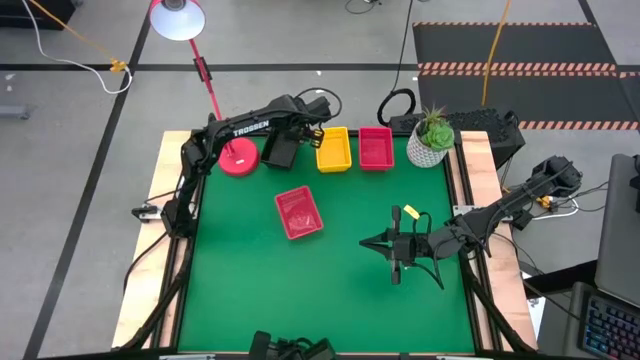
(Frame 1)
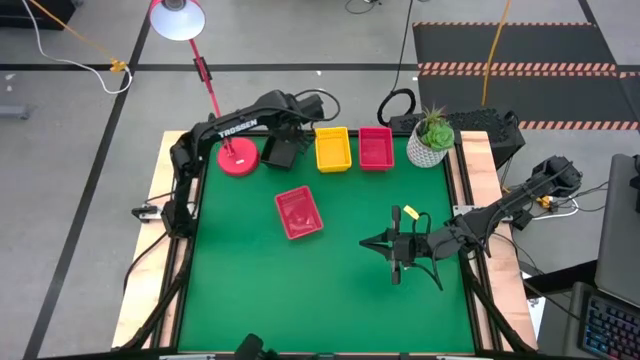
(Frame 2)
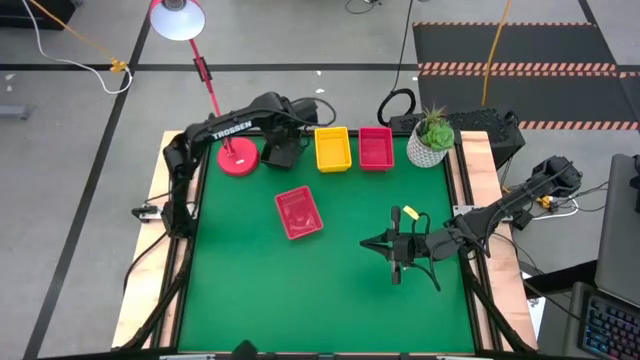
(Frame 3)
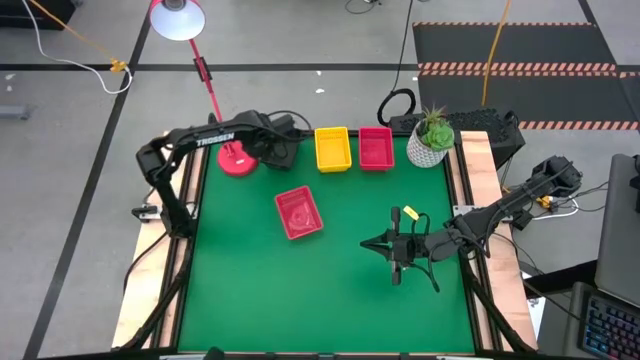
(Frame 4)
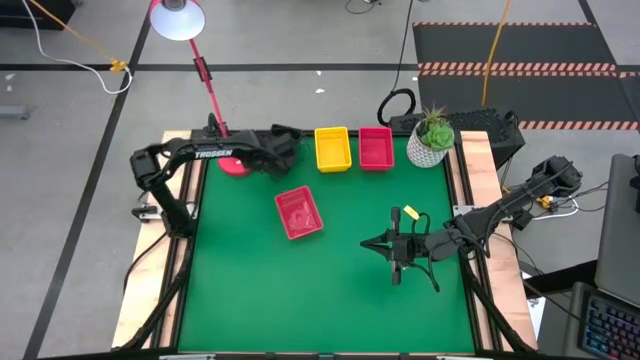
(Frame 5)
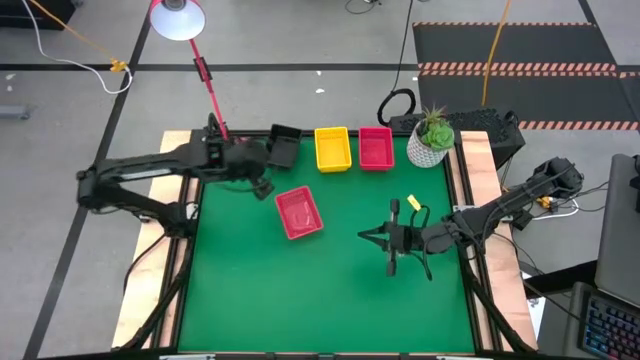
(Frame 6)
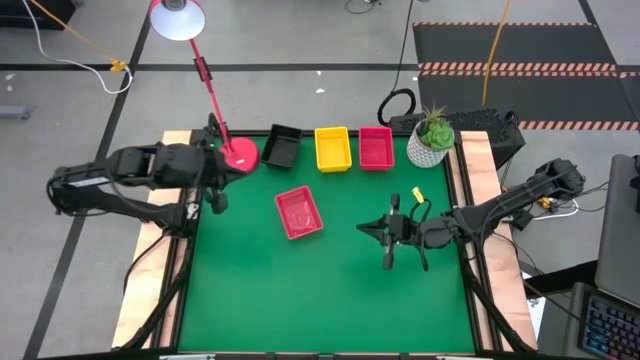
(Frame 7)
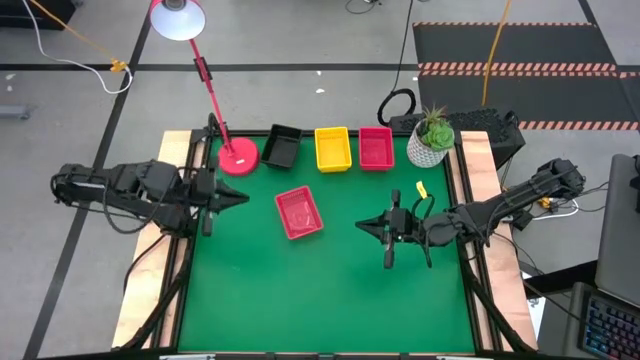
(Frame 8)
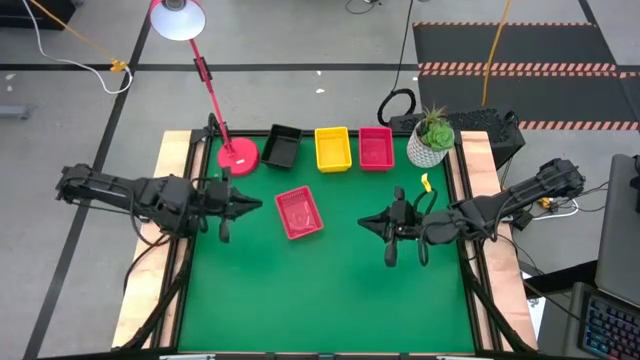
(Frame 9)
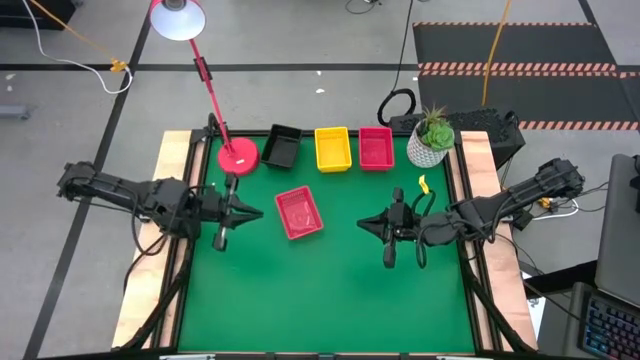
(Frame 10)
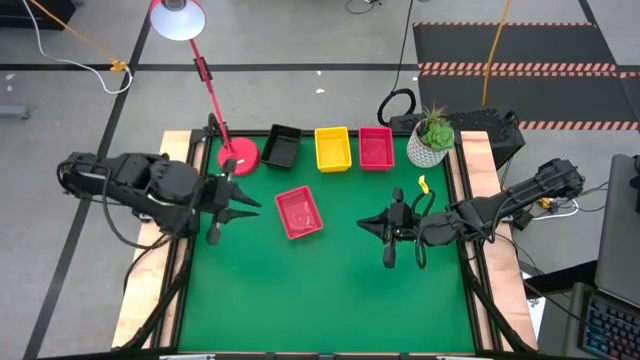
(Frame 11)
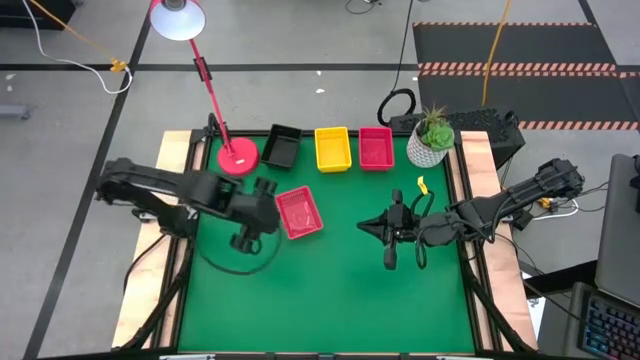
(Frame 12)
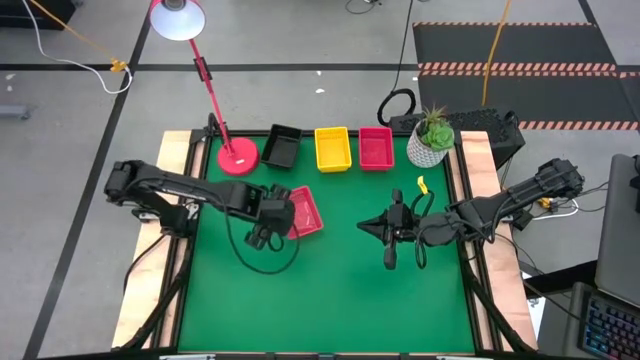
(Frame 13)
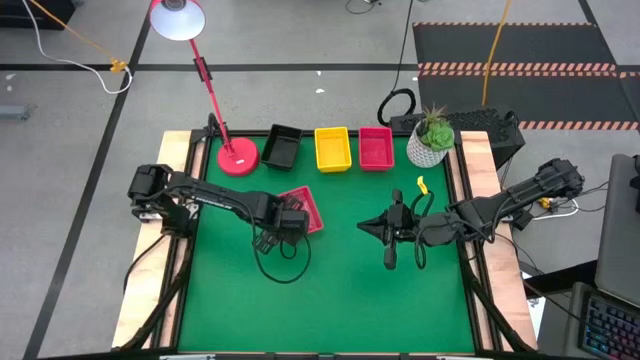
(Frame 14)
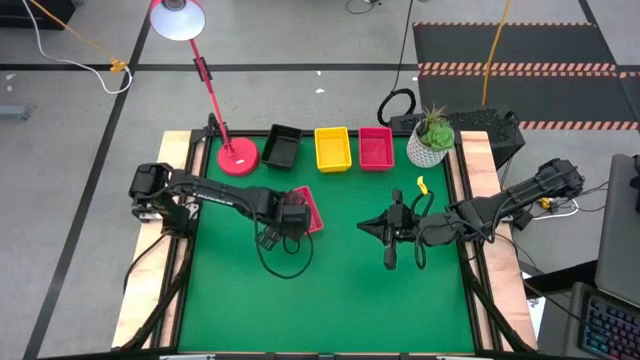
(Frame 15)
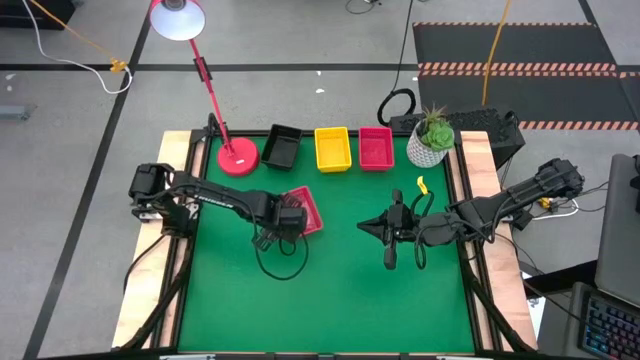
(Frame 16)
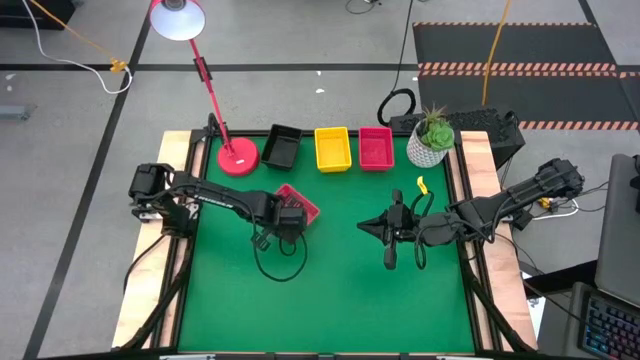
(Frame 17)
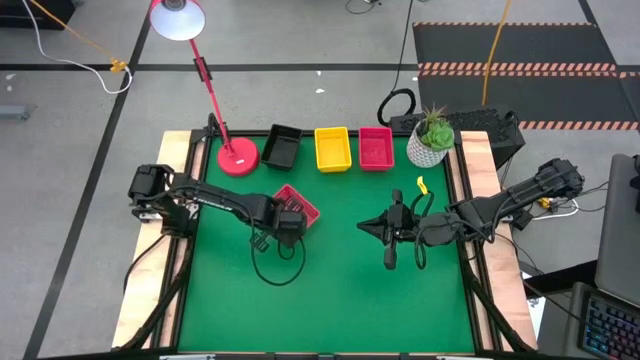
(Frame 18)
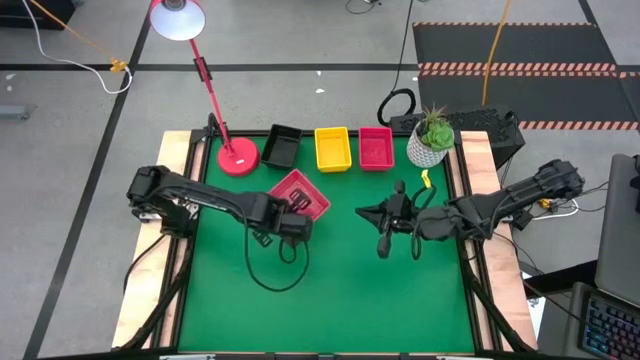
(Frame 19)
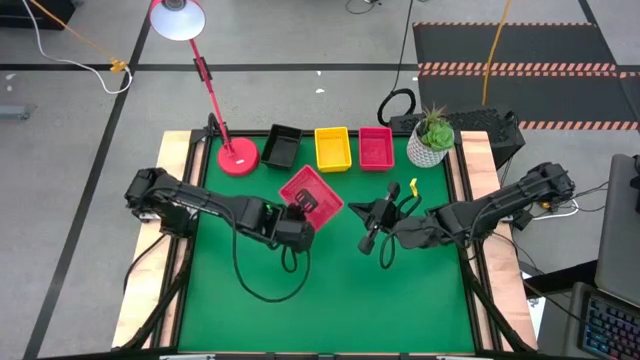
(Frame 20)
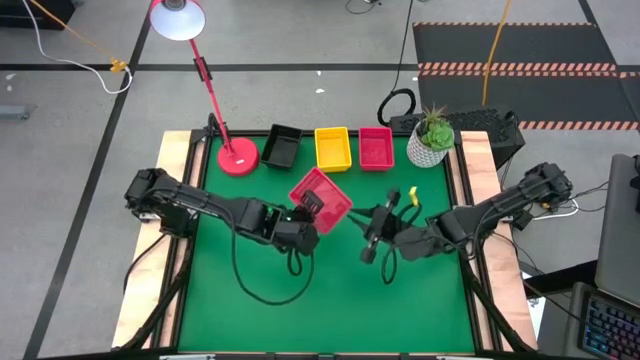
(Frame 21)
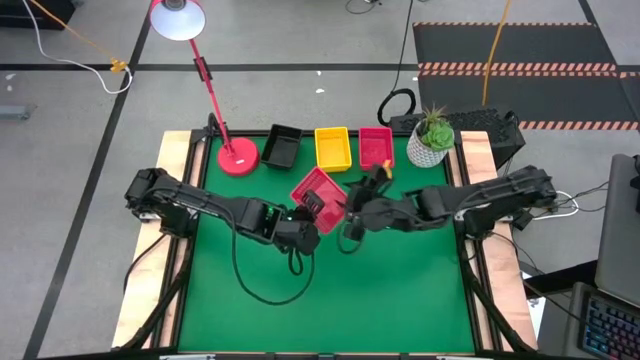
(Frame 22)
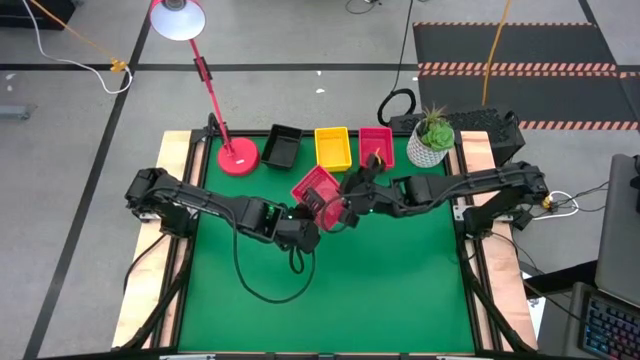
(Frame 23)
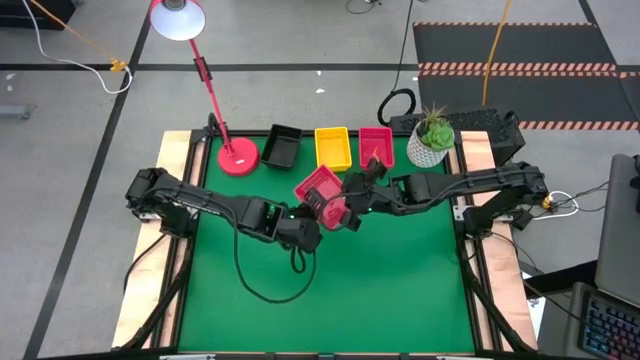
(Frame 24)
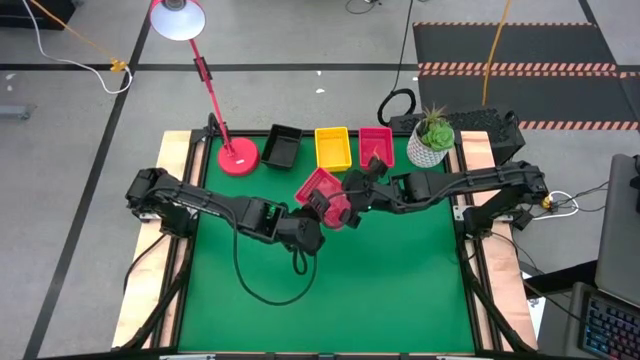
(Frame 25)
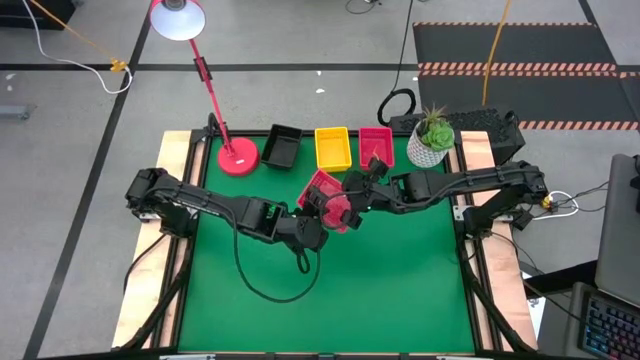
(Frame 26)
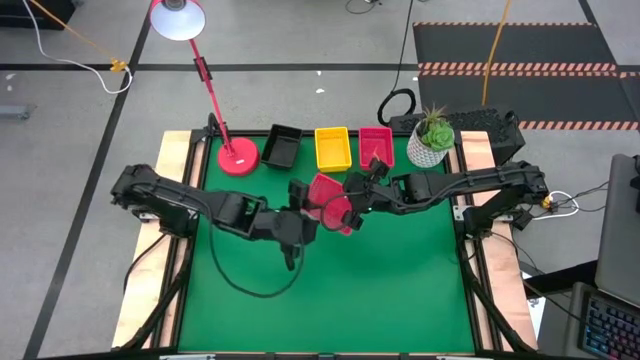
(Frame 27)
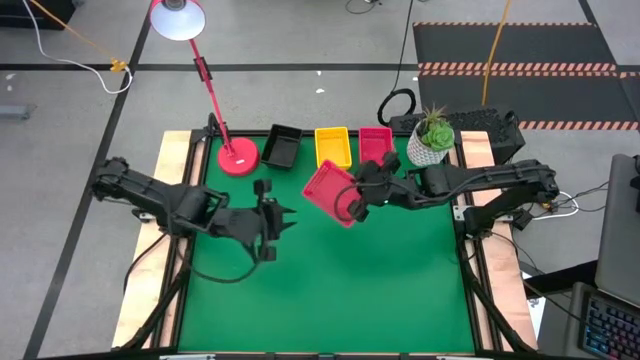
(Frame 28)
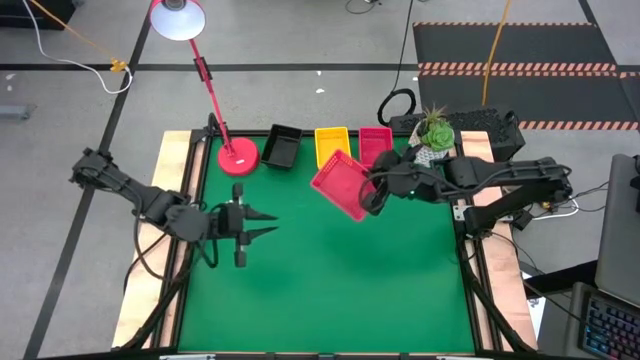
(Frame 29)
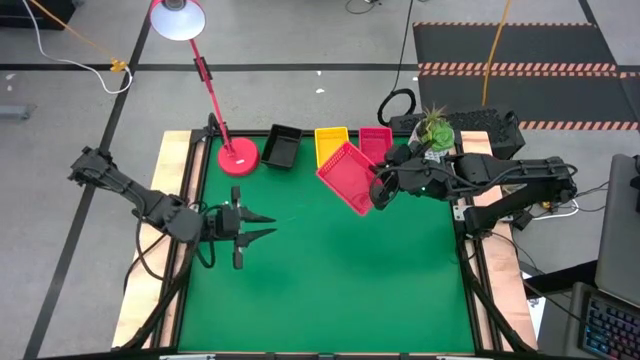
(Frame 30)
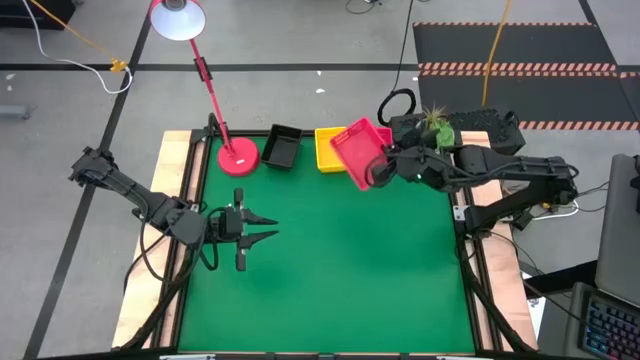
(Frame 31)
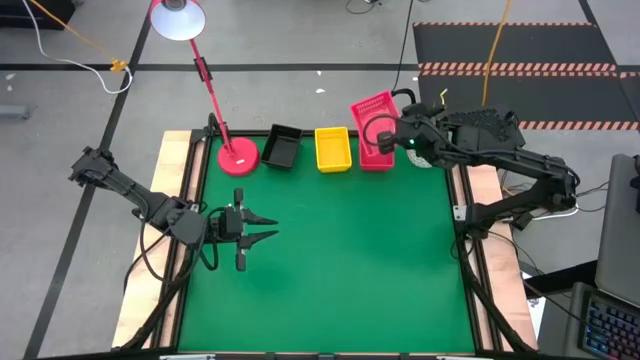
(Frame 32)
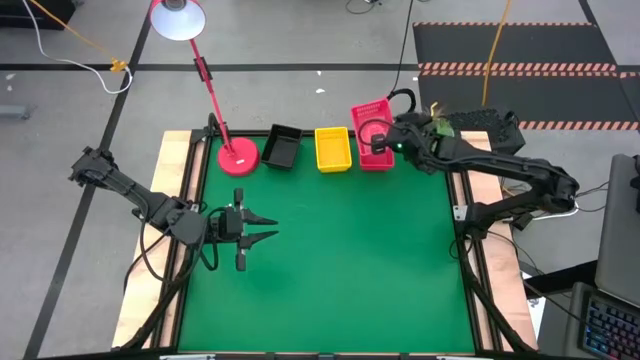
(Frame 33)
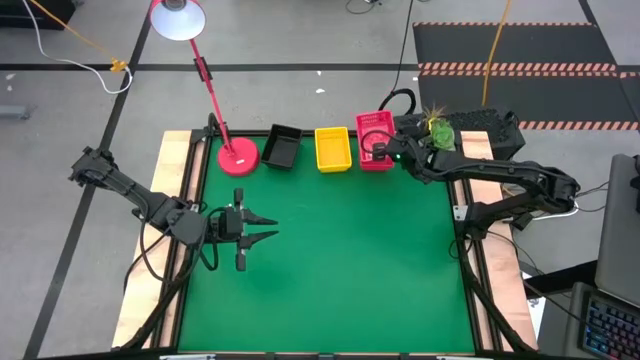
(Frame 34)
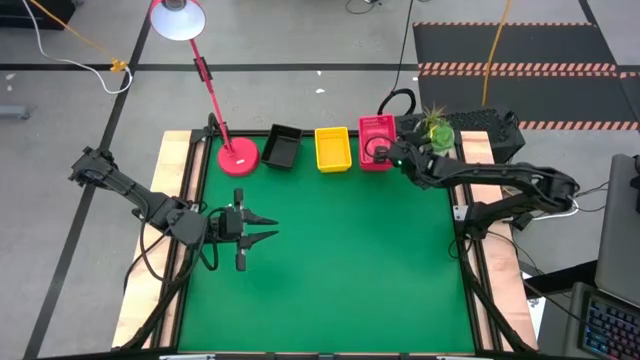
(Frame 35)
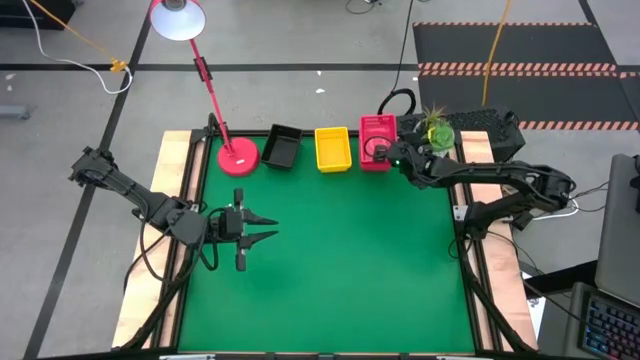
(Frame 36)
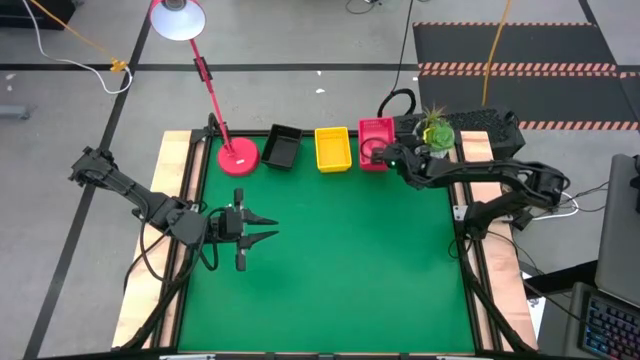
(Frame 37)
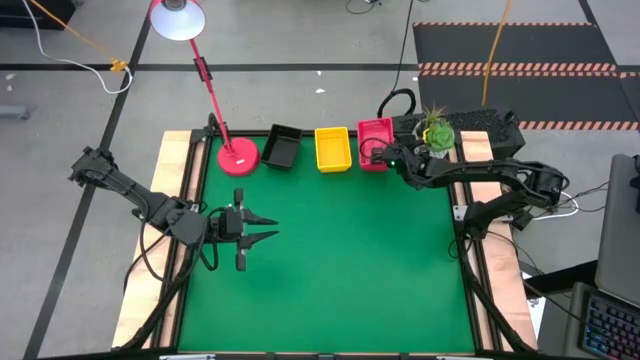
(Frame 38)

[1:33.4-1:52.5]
Stack the bottom red bin on the top stacked red bin
